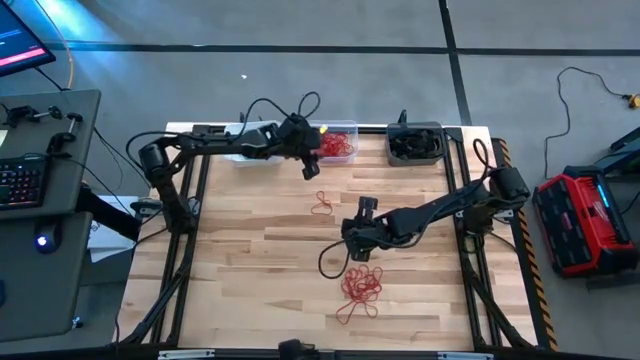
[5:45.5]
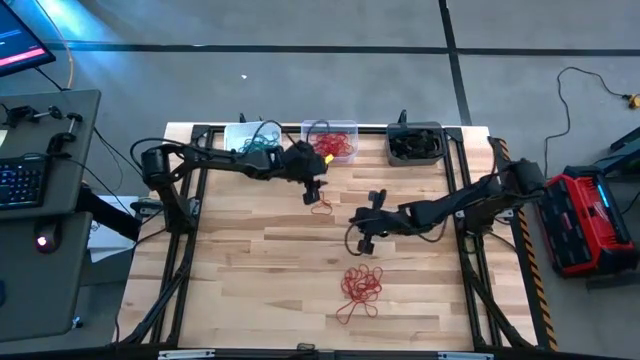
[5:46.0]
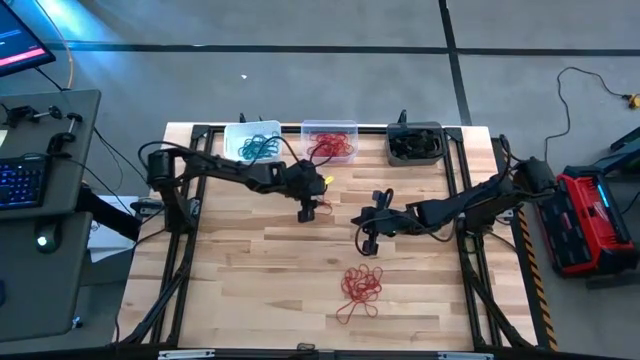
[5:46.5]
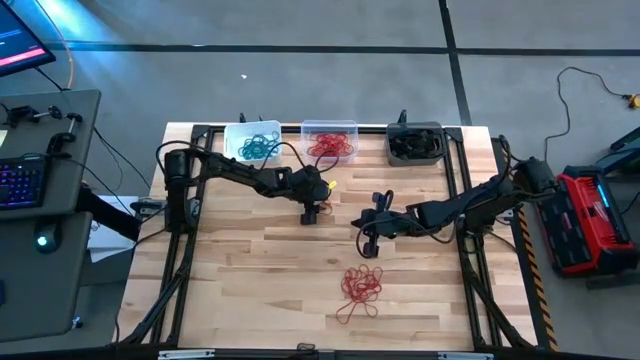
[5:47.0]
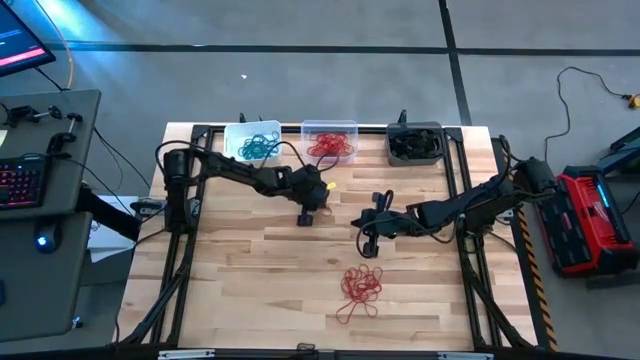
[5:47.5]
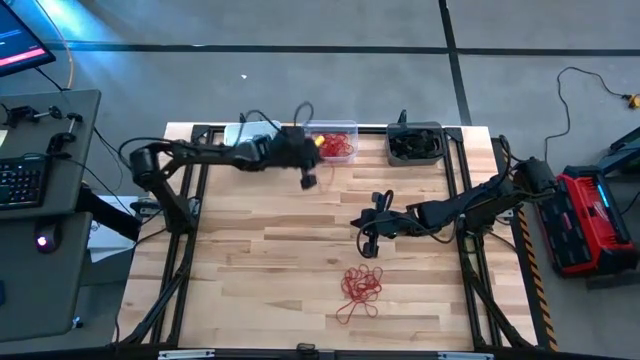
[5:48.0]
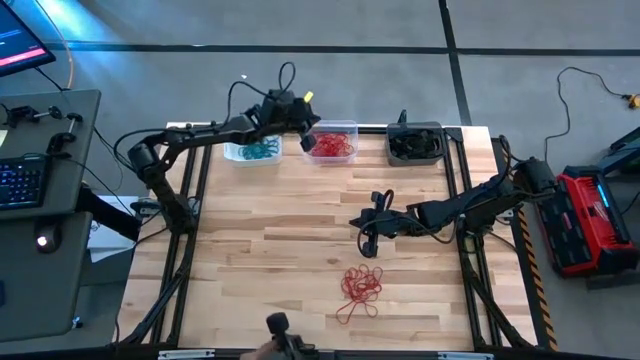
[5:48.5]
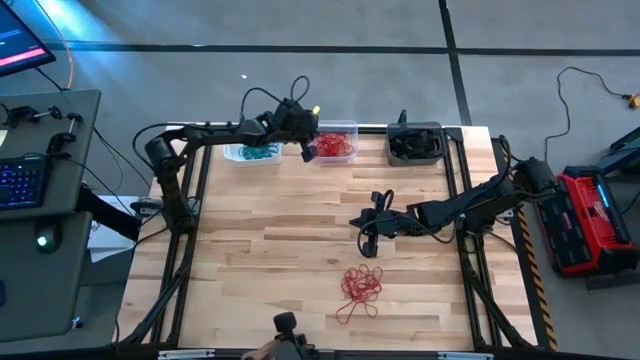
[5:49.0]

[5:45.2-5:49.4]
Task: Sort rubber bands into baskets
Put the red rubber band into the transparent bin

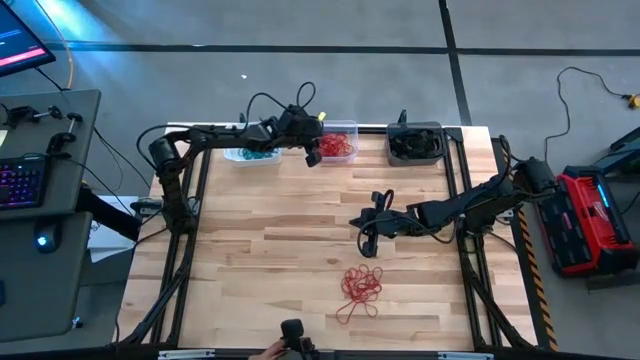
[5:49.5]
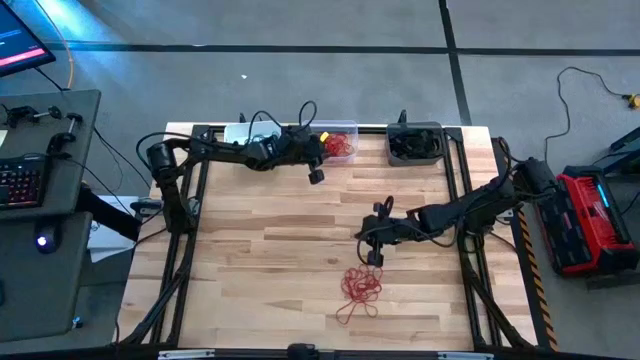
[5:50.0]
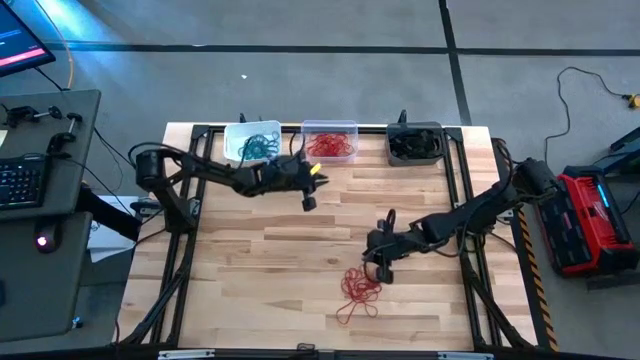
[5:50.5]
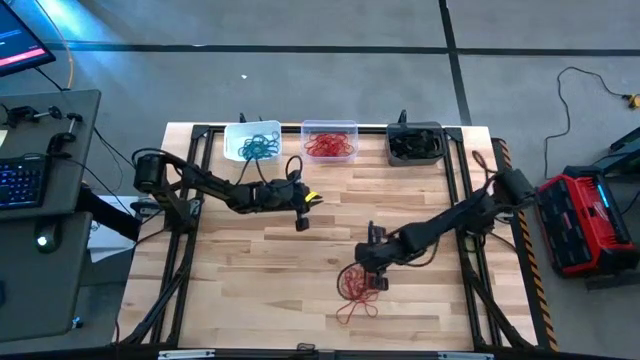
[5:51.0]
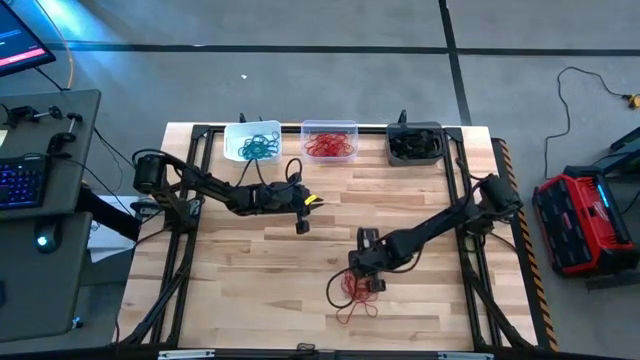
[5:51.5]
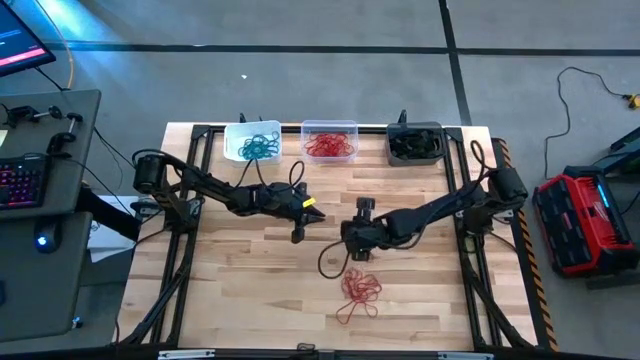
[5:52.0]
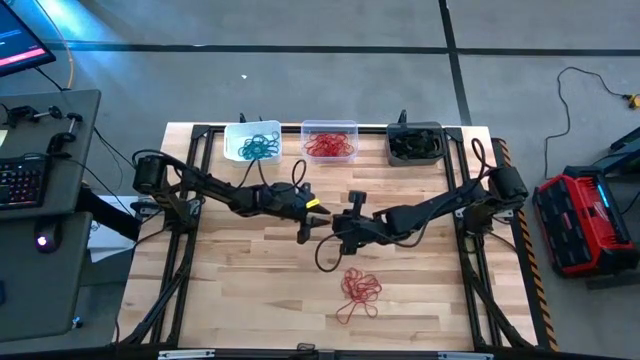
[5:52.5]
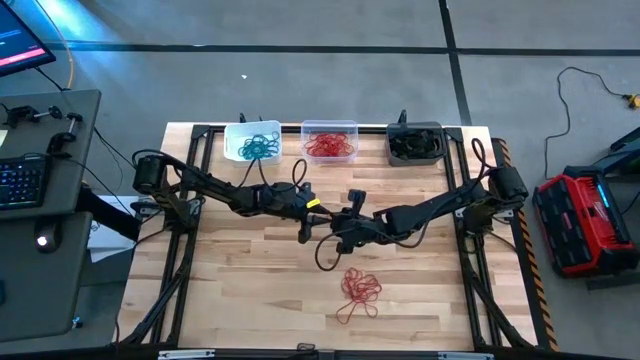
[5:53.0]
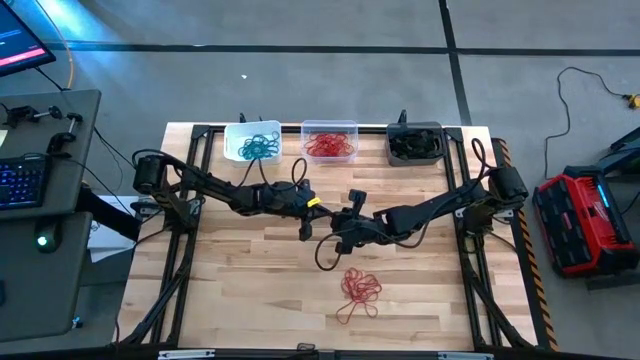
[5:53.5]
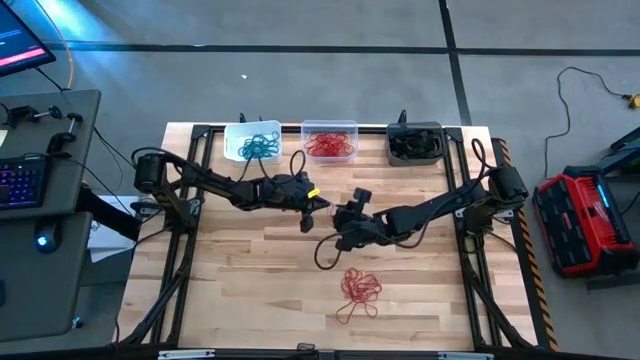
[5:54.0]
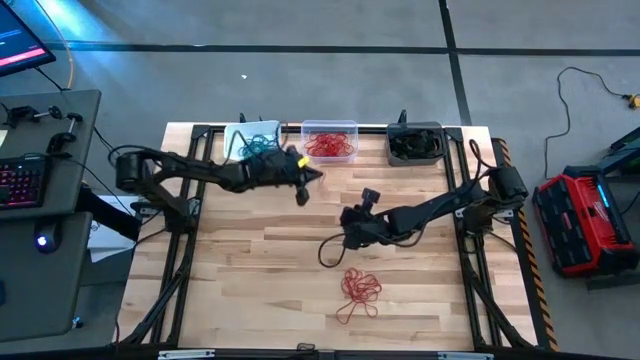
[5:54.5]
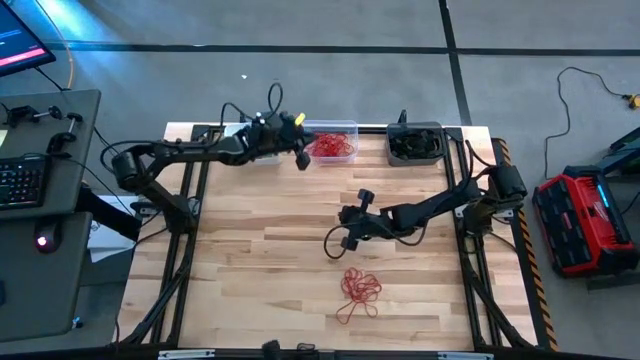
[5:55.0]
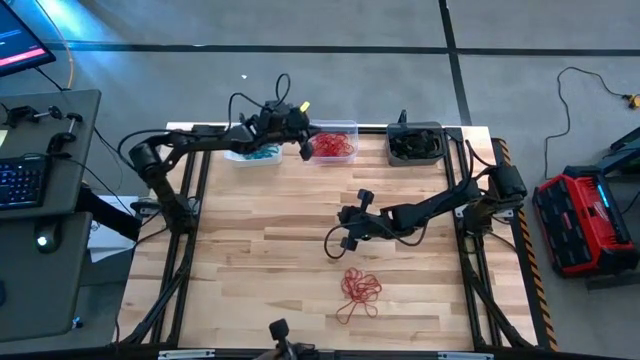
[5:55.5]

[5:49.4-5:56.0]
Put the red rubber band into the transparent bin

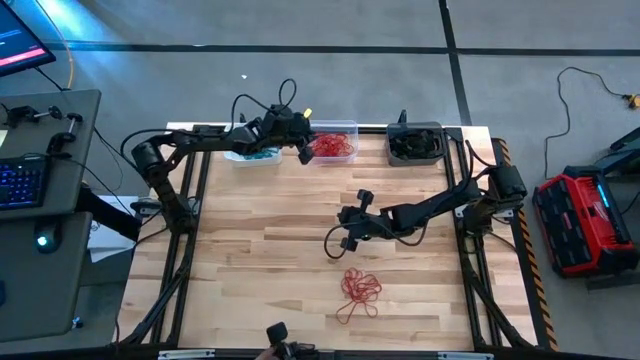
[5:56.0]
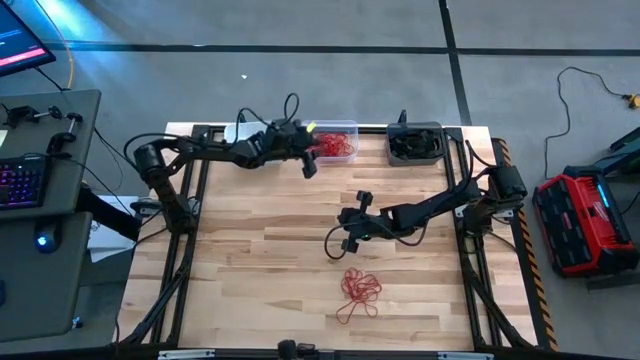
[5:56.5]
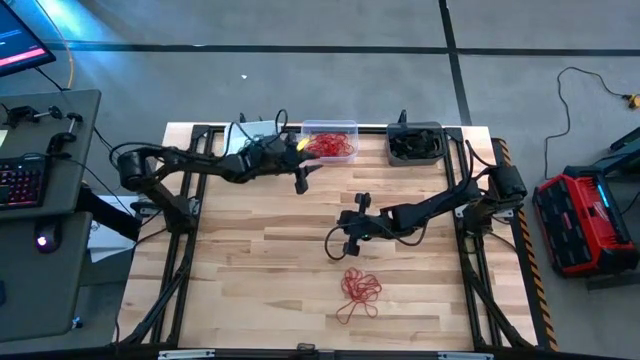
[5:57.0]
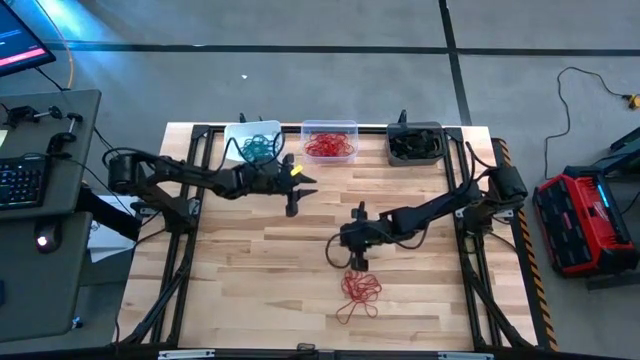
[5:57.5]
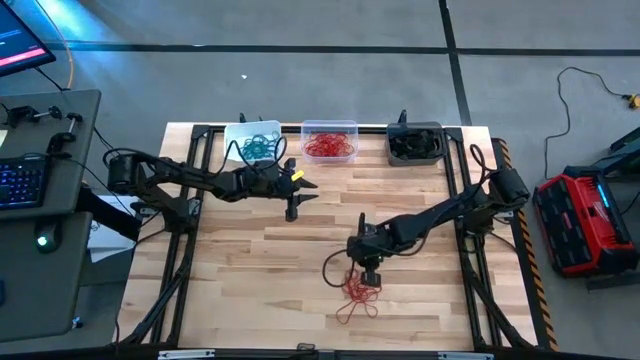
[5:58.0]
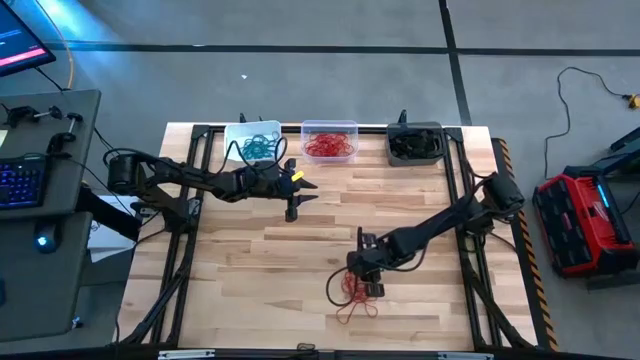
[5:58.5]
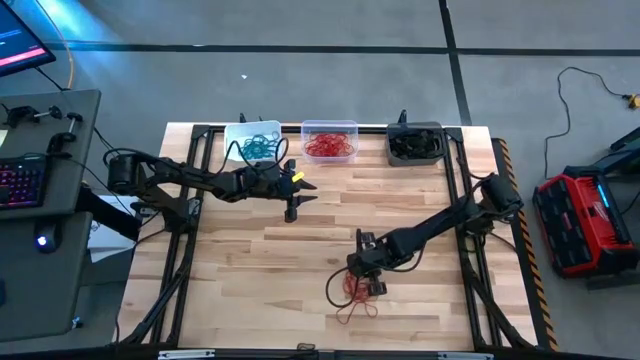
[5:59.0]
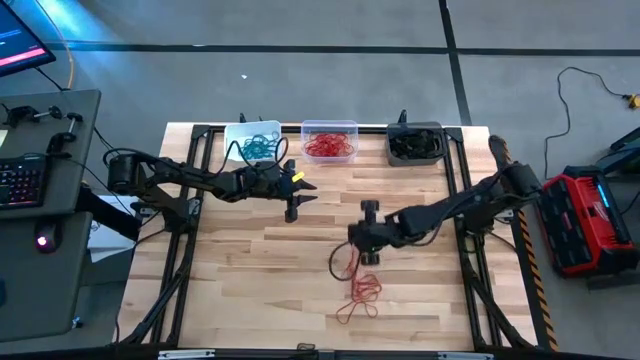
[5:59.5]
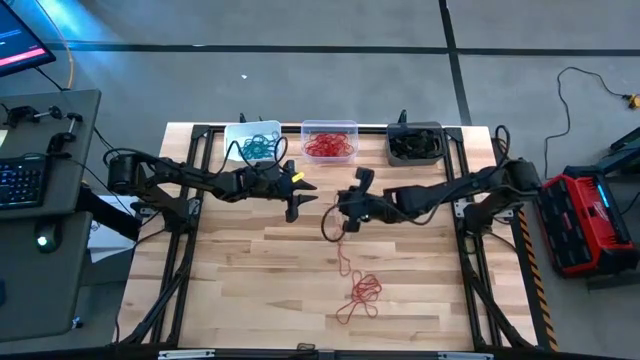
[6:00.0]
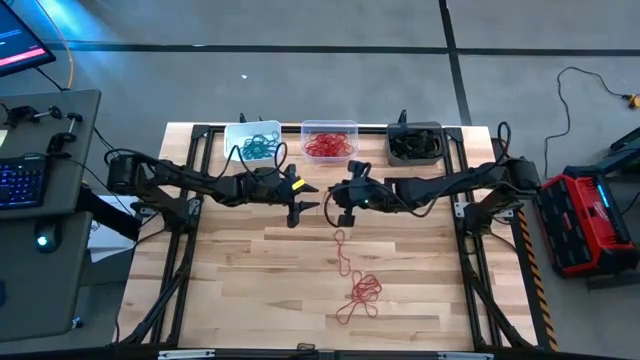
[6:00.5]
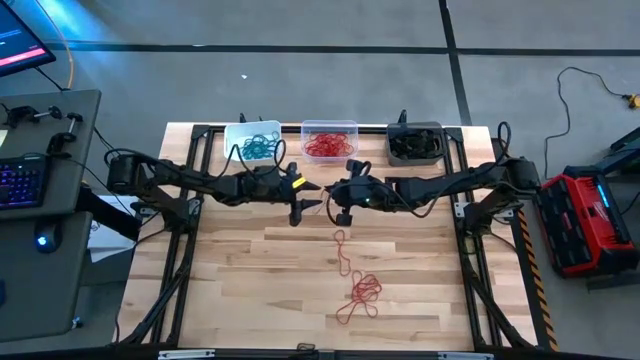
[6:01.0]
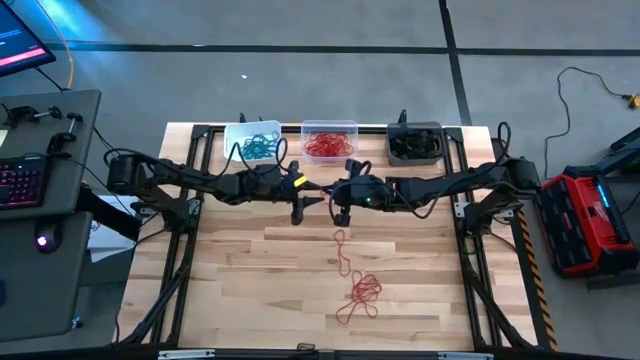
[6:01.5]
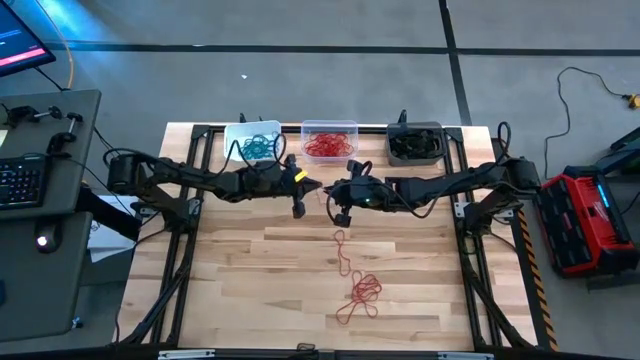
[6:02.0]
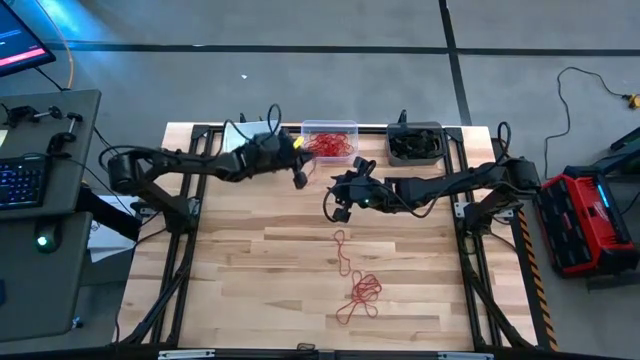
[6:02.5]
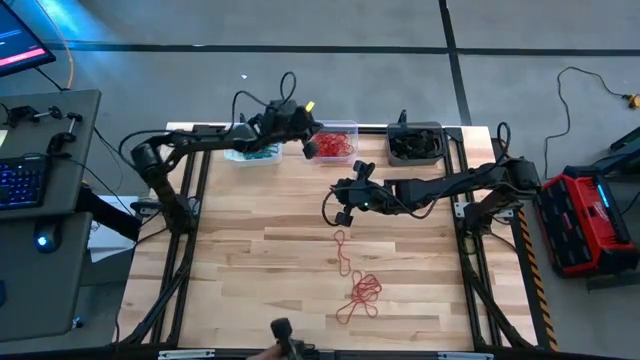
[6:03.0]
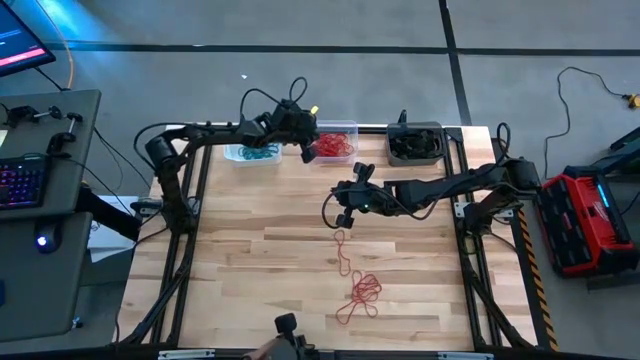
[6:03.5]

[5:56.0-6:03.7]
Put the red rubber band into the transparent bin

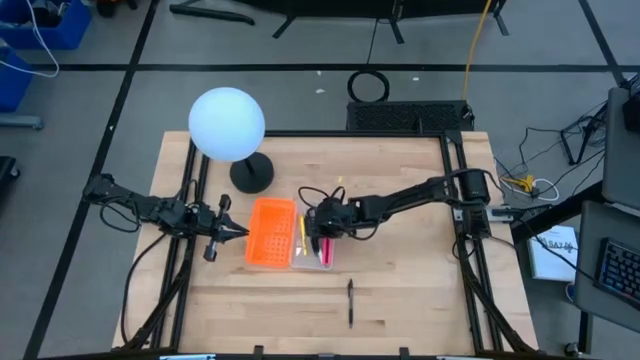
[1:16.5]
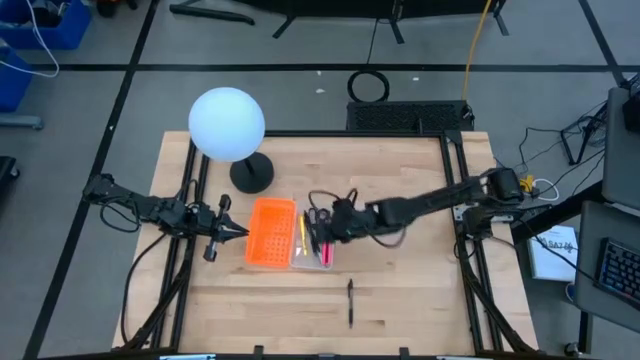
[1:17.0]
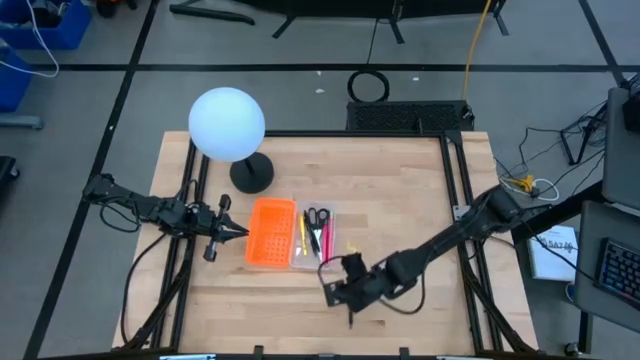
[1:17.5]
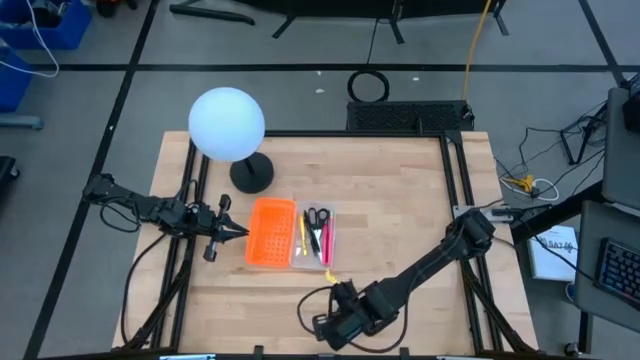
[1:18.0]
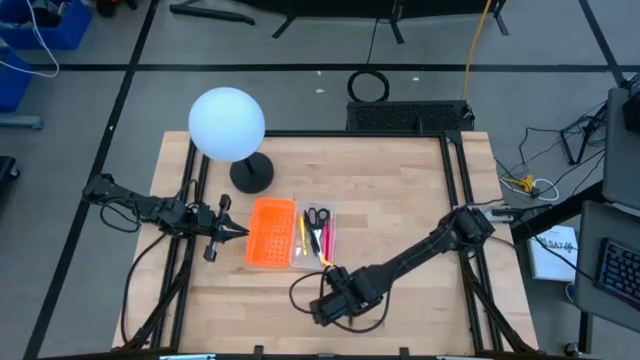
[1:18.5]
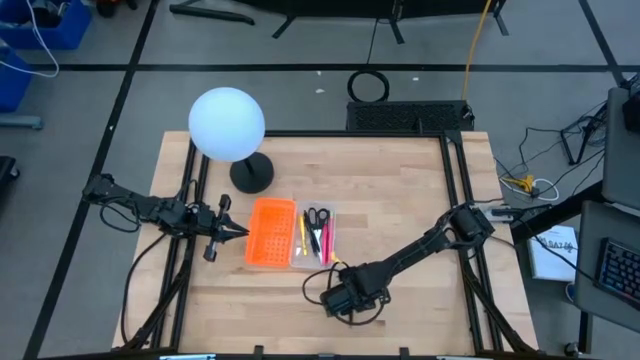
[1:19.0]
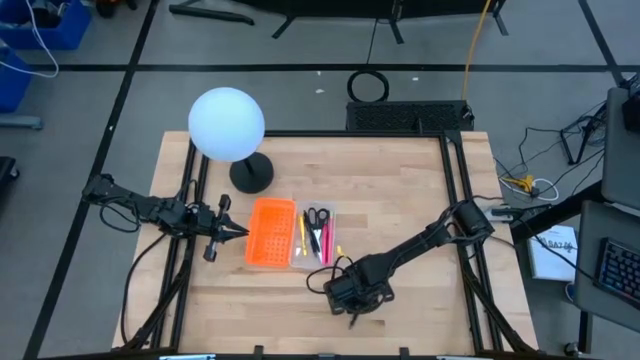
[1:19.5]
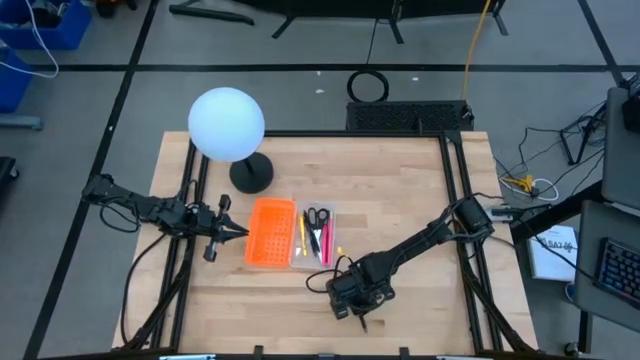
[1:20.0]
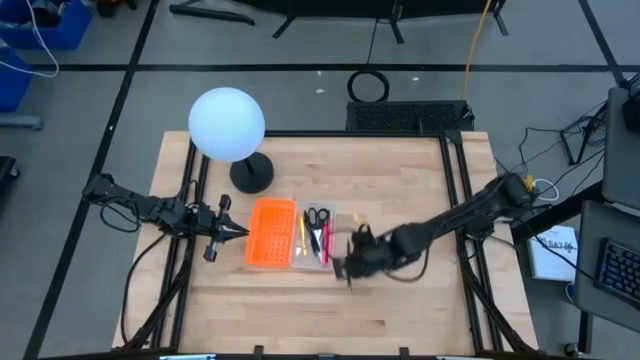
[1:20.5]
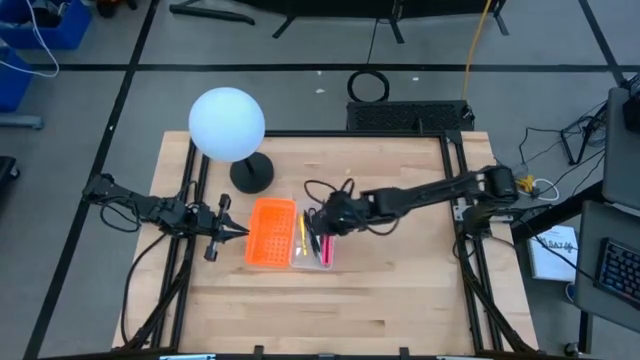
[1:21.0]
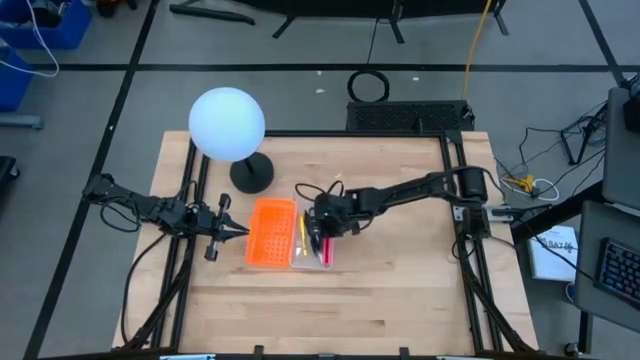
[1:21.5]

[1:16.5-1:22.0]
Task: Pick & place school supplies into a supply box
Put the black pen into the supply box
